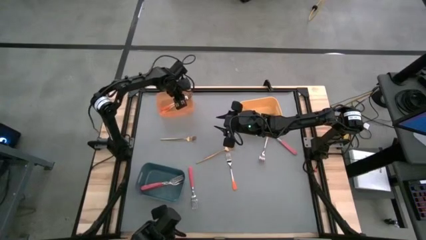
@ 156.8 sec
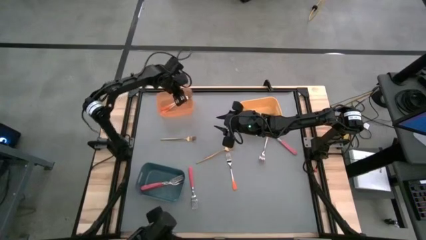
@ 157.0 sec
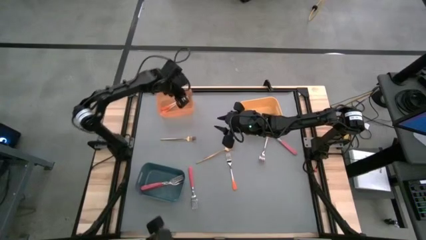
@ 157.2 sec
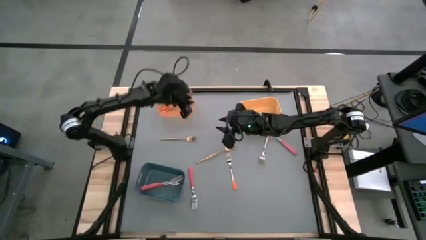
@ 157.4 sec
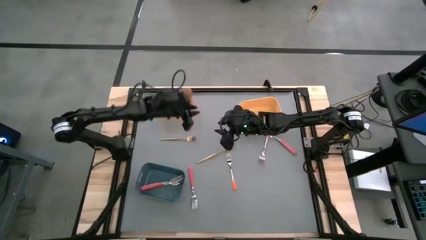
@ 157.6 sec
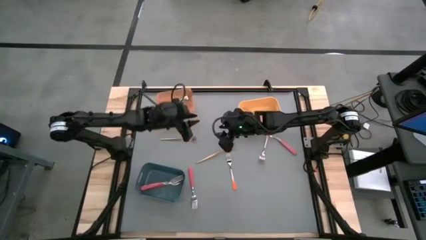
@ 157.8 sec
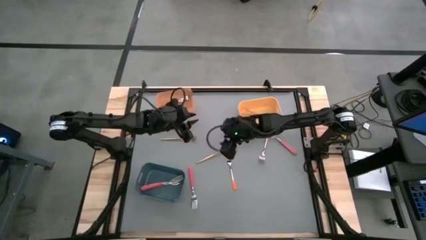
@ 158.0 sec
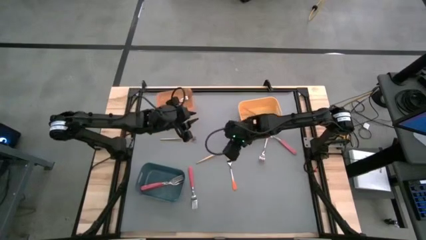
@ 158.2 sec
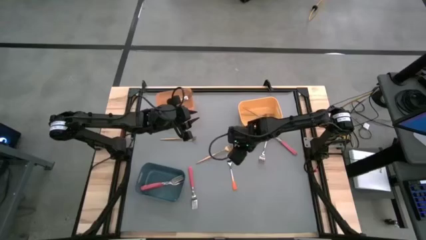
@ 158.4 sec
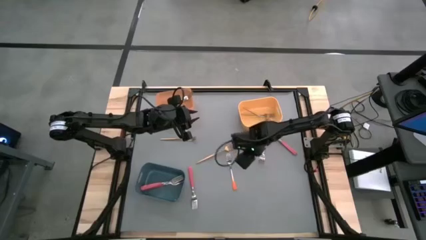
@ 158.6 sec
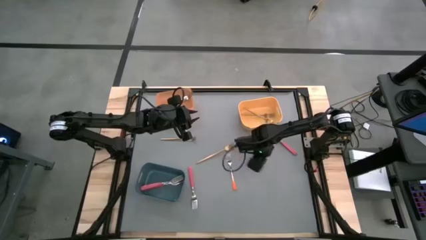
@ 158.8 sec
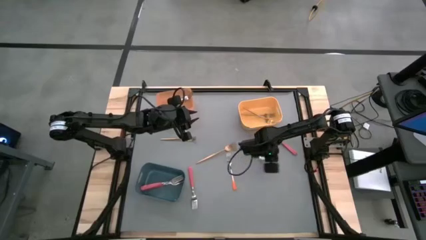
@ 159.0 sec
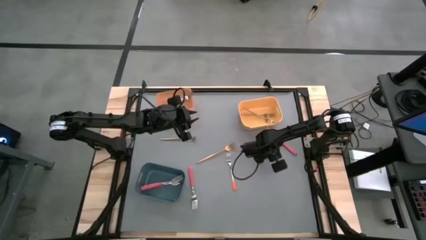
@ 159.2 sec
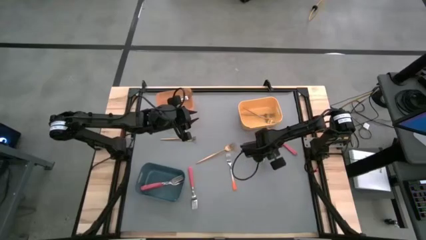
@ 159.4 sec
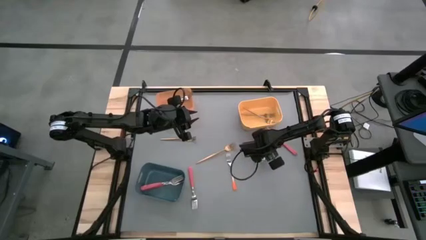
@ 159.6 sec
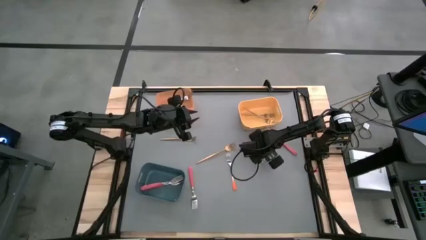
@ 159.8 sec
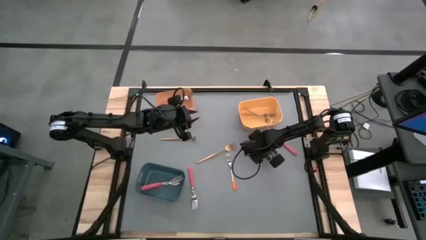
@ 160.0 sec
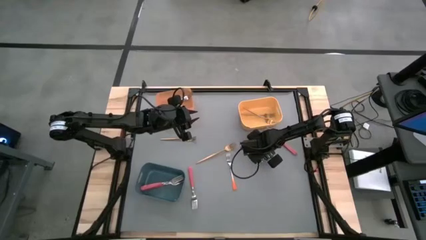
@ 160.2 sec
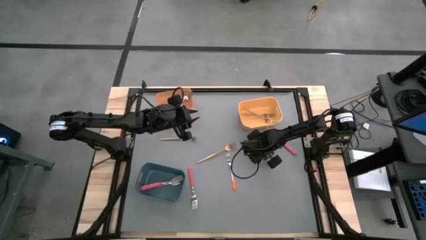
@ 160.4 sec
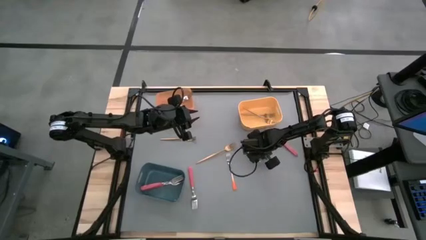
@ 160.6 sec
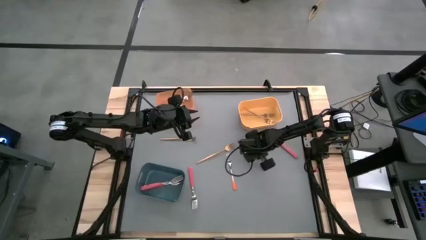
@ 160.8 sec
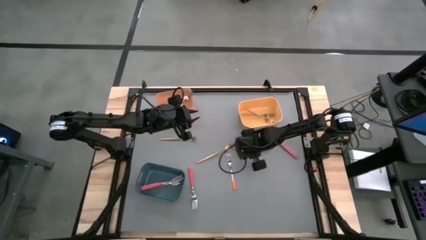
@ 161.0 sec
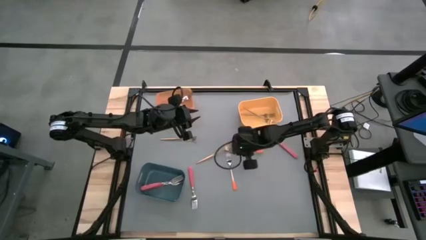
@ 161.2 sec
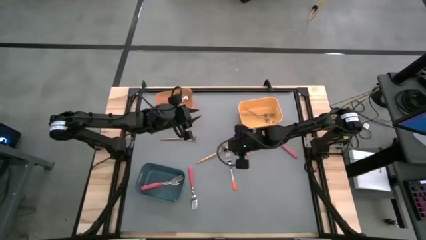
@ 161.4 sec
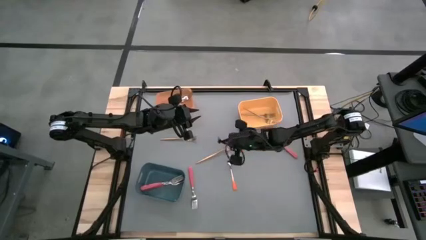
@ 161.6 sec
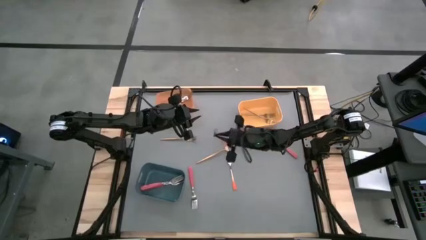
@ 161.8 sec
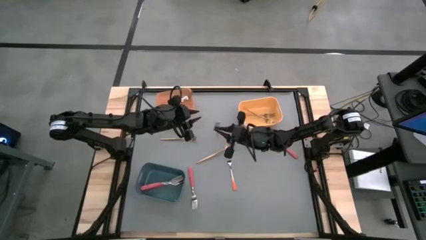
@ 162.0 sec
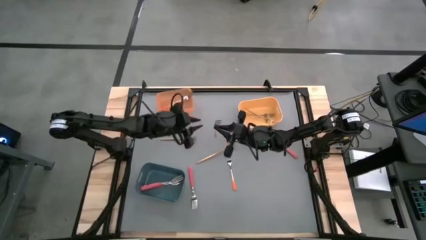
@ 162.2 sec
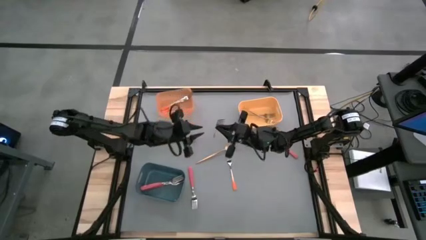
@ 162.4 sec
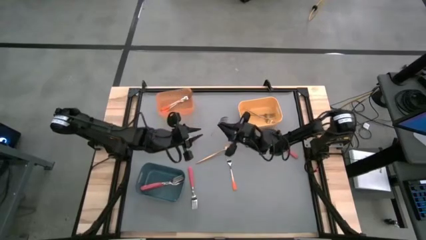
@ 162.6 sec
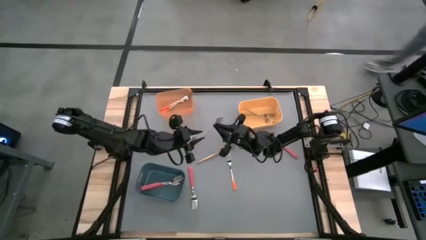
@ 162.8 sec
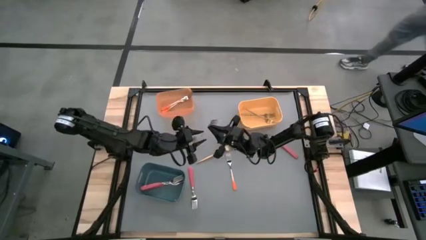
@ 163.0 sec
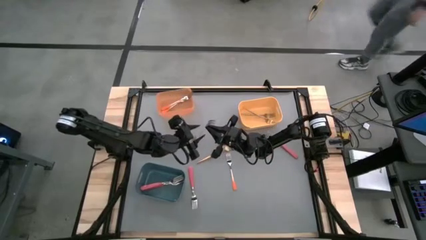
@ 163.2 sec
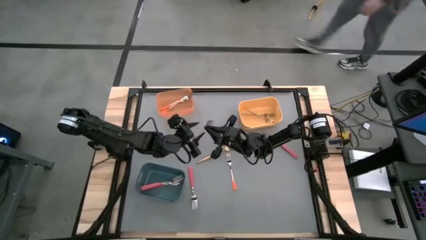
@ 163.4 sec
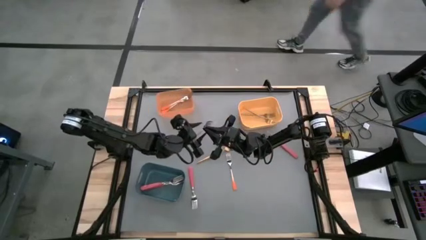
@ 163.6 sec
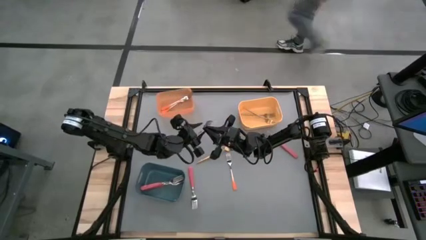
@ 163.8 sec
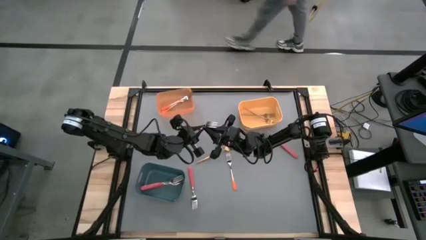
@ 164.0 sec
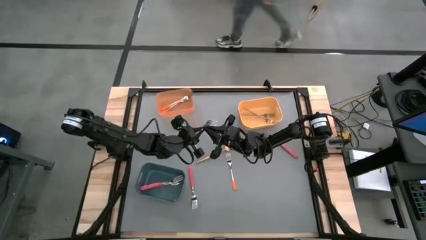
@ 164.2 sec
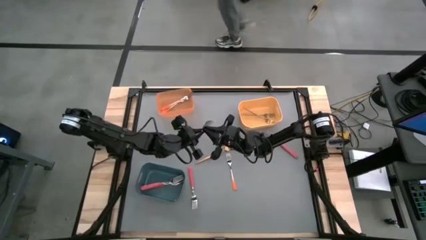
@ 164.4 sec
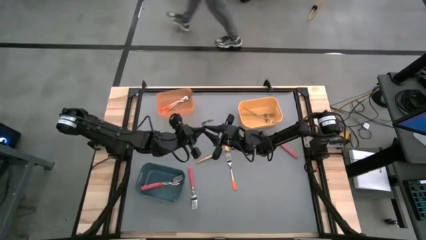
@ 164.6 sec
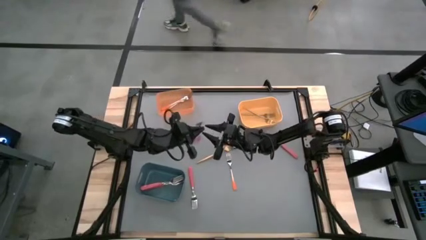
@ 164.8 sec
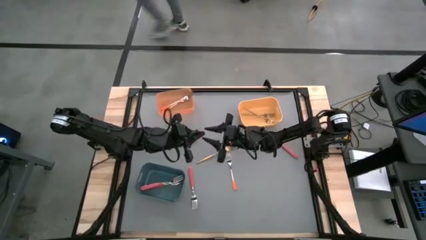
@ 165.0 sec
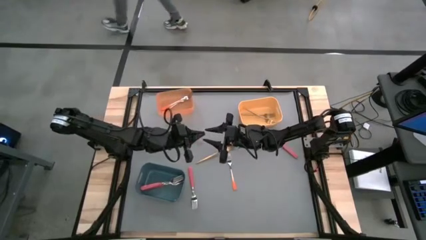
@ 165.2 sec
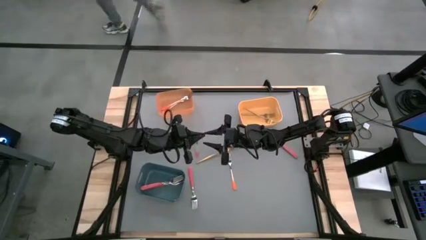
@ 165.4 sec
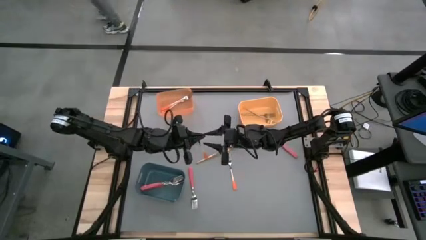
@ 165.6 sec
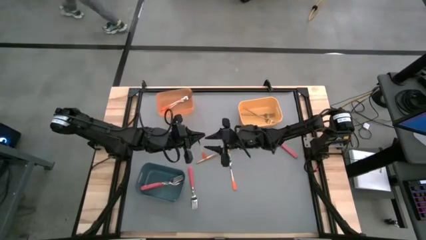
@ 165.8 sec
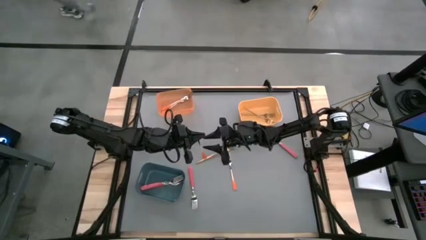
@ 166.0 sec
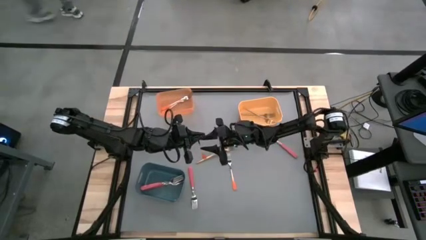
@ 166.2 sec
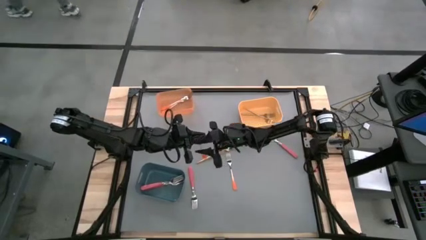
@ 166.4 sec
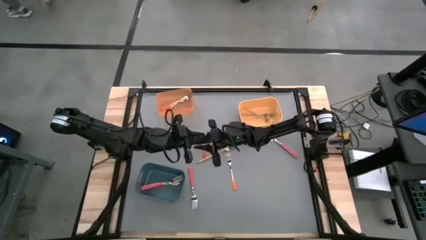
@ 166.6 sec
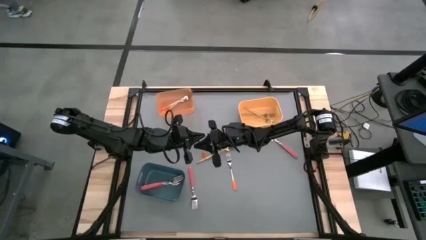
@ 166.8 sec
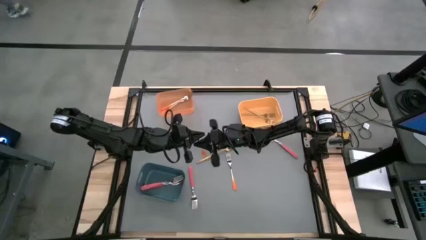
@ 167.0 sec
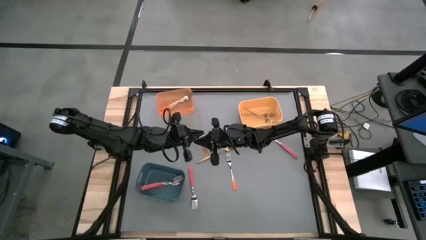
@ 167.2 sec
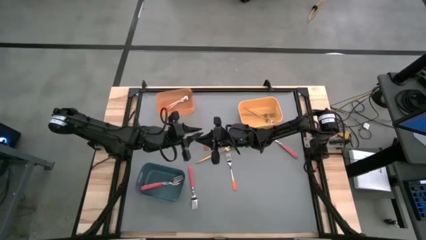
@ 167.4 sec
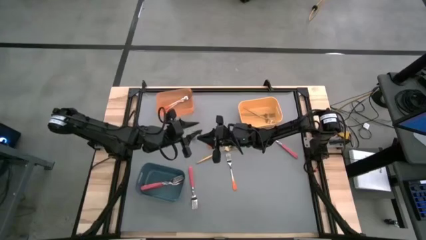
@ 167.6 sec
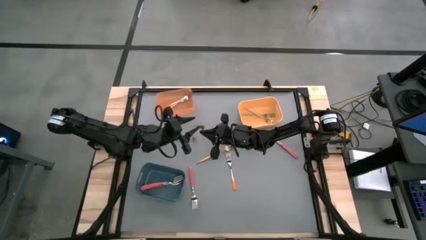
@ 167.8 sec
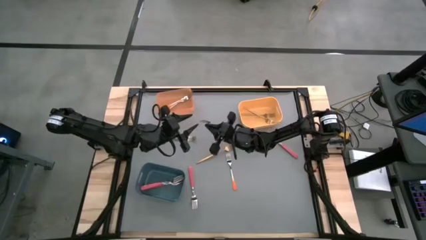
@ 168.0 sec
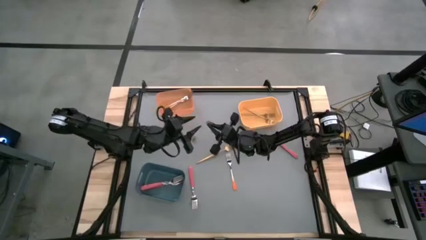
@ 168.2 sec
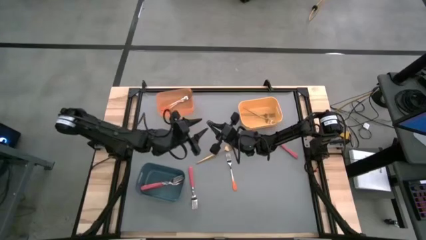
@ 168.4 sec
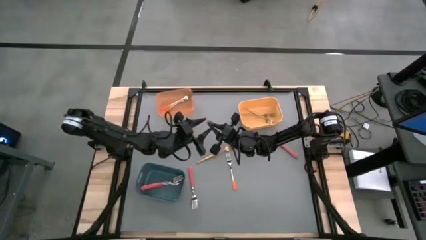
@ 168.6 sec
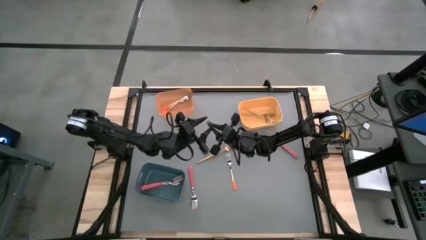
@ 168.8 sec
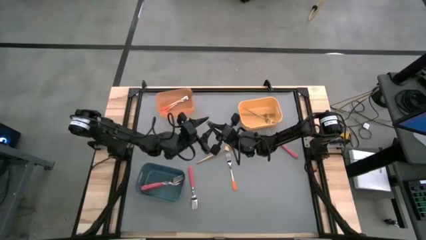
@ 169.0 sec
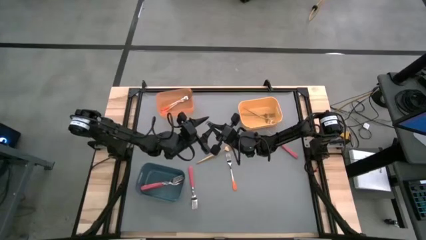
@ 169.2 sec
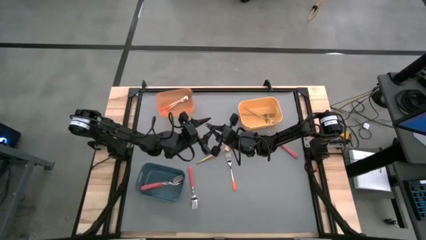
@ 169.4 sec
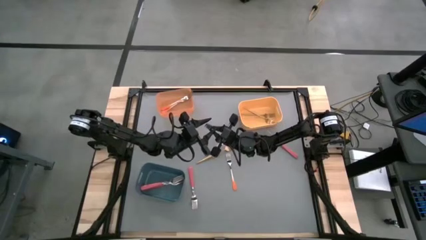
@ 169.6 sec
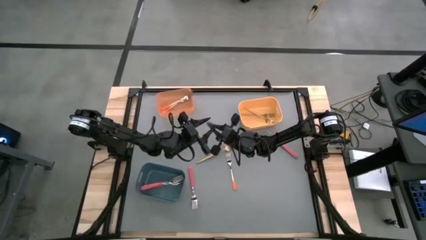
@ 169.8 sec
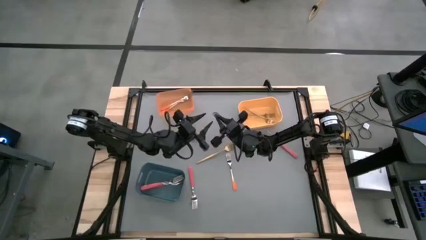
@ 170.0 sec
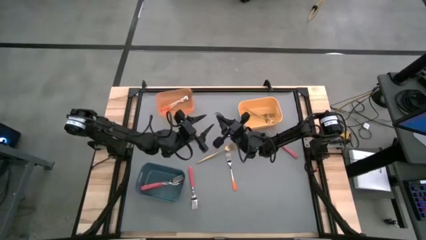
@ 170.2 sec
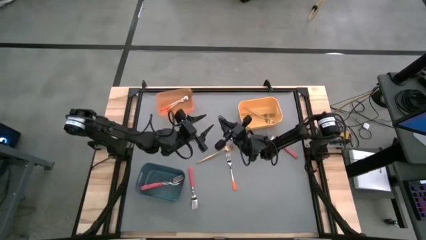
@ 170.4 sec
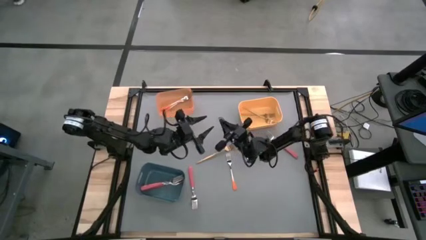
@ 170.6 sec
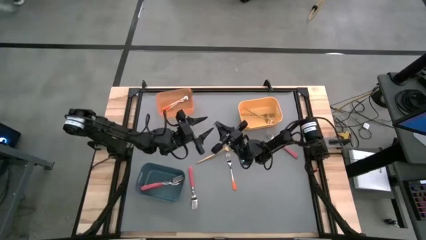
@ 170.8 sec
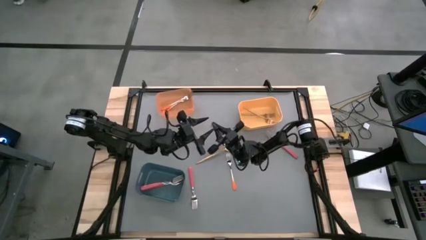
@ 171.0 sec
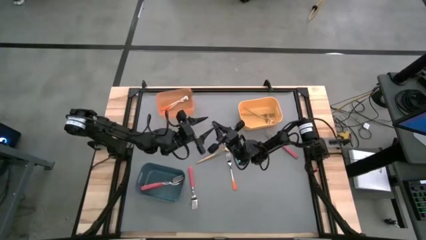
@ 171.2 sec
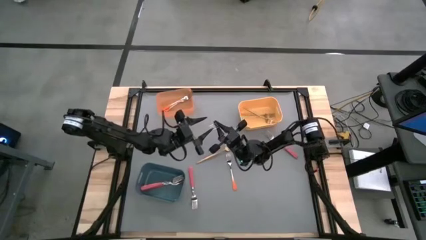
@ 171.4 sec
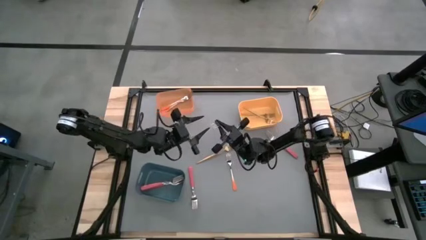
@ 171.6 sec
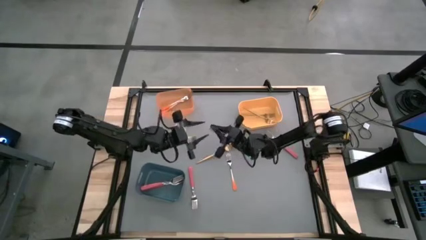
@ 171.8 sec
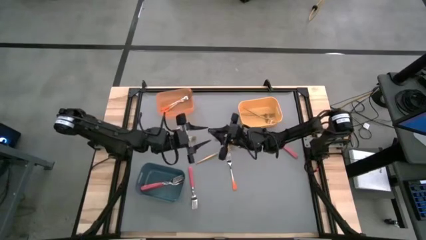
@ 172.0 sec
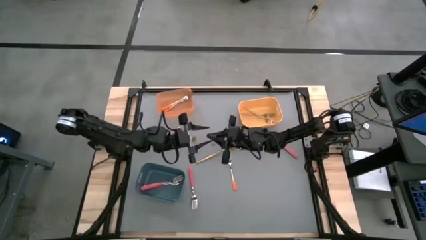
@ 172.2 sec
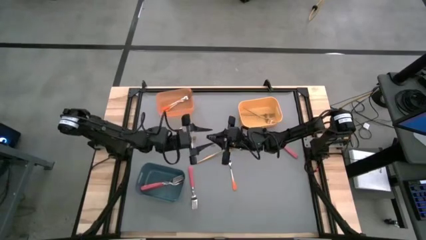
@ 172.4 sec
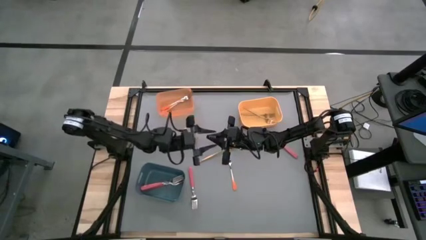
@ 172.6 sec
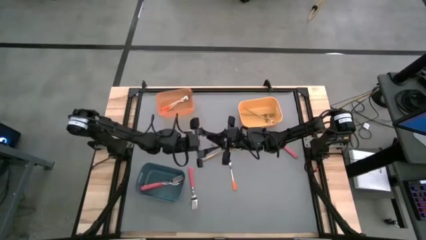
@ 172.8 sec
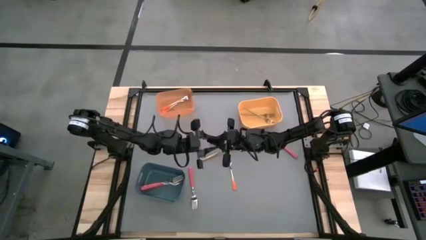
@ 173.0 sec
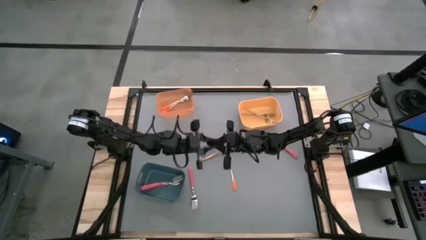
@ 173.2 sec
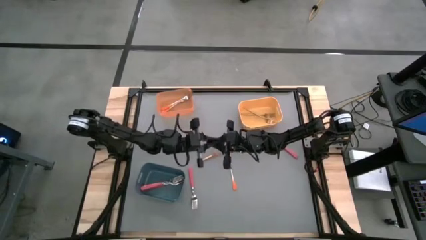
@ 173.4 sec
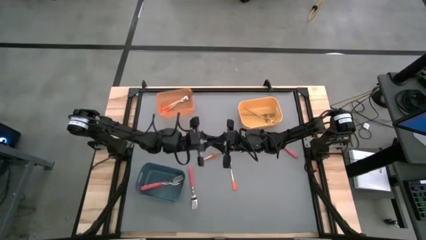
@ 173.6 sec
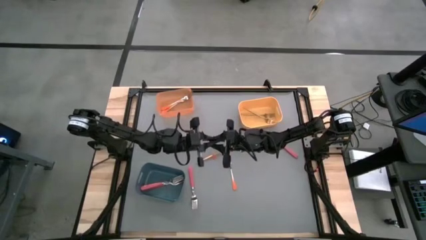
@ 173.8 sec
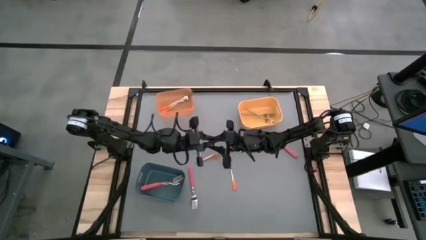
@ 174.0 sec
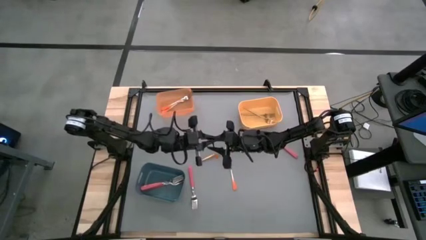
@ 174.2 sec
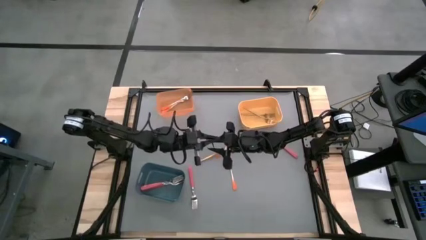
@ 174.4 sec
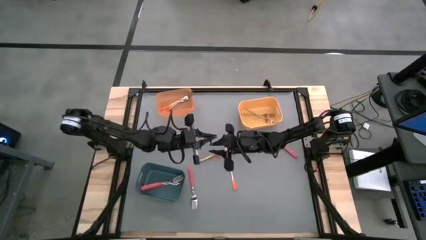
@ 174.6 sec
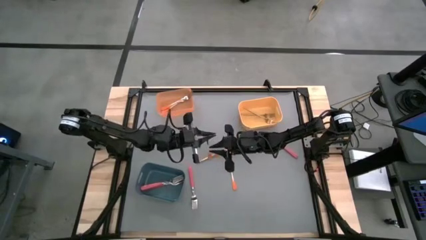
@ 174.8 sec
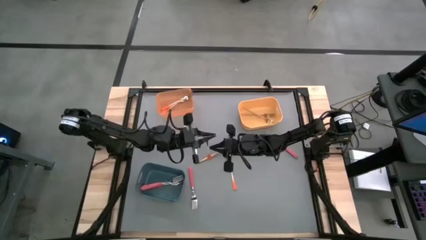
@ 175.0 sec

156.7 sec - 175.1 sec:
Task: Sort silverware by color (type)
Put the orange fork into the orange bin
